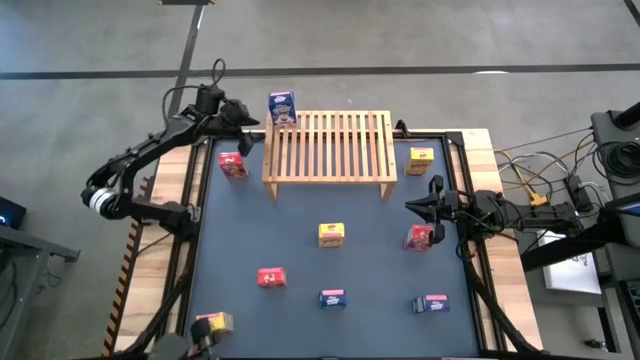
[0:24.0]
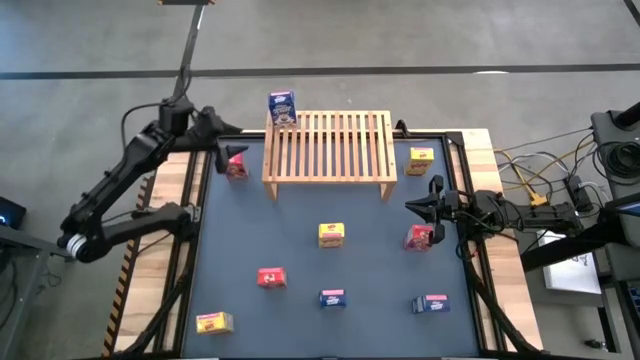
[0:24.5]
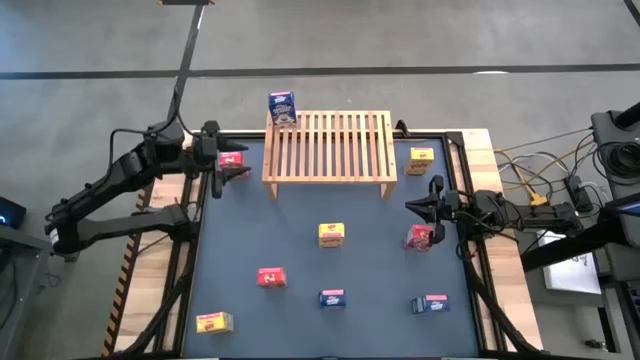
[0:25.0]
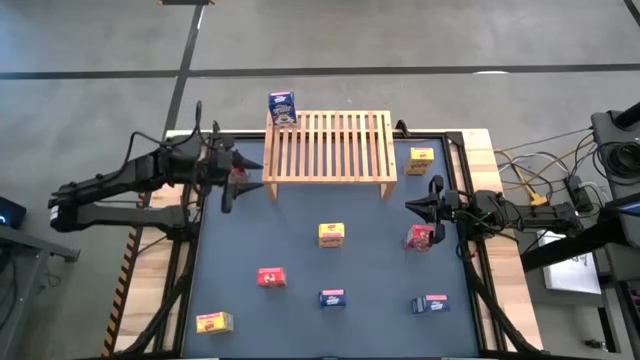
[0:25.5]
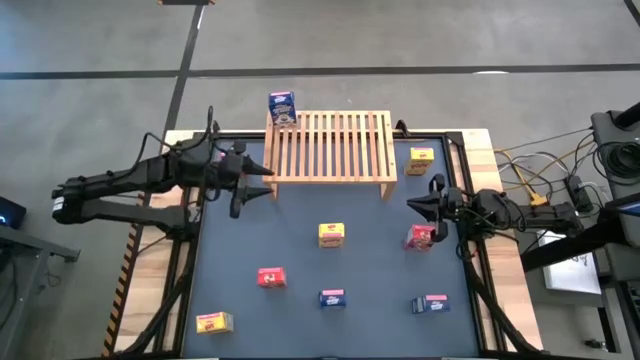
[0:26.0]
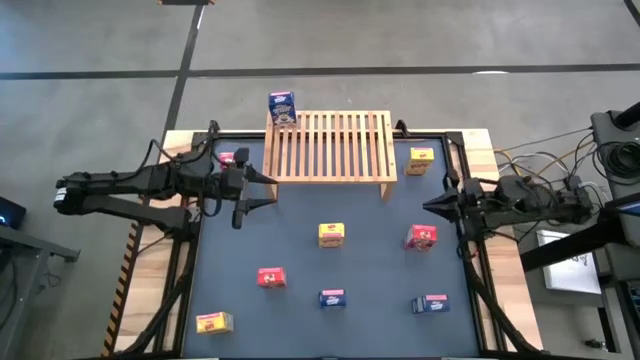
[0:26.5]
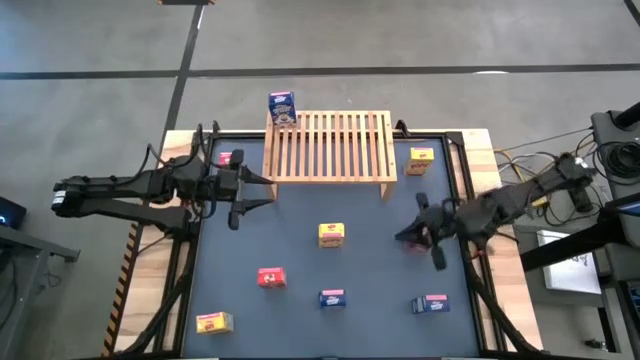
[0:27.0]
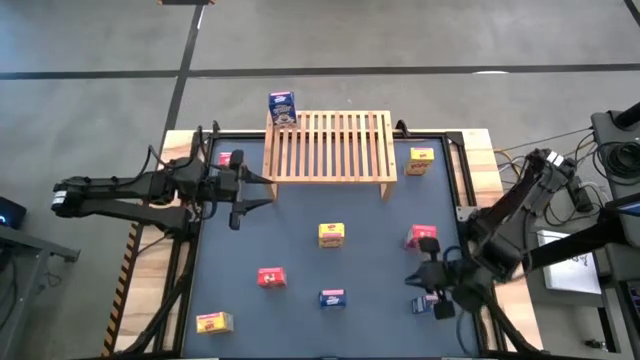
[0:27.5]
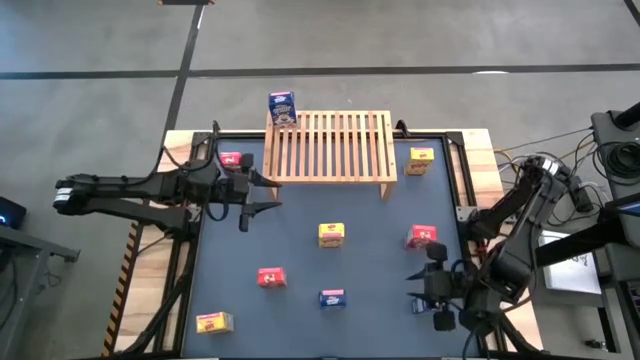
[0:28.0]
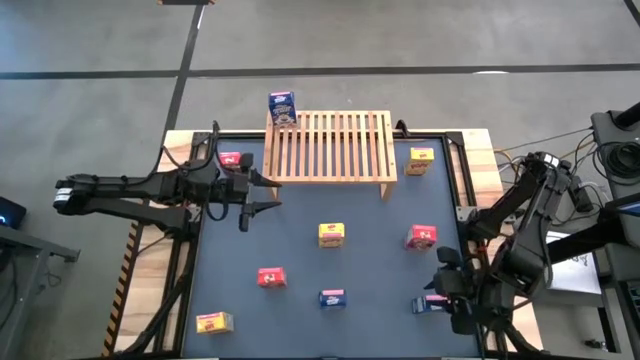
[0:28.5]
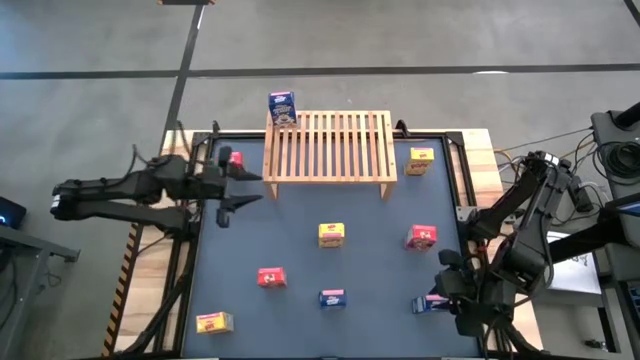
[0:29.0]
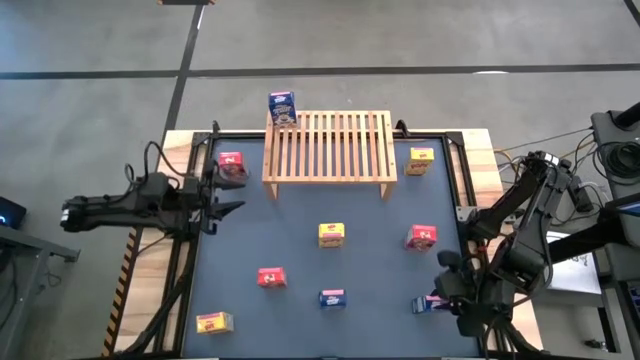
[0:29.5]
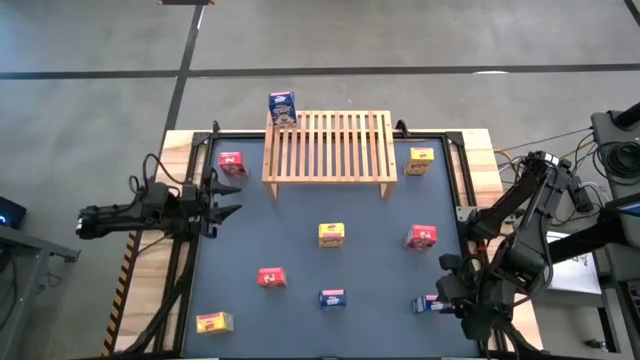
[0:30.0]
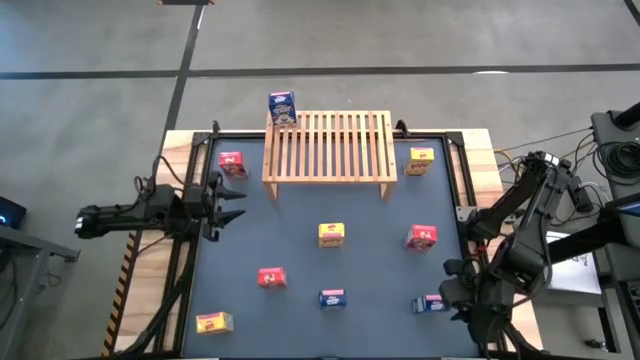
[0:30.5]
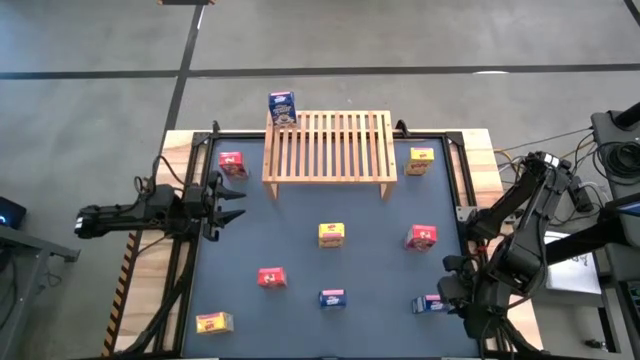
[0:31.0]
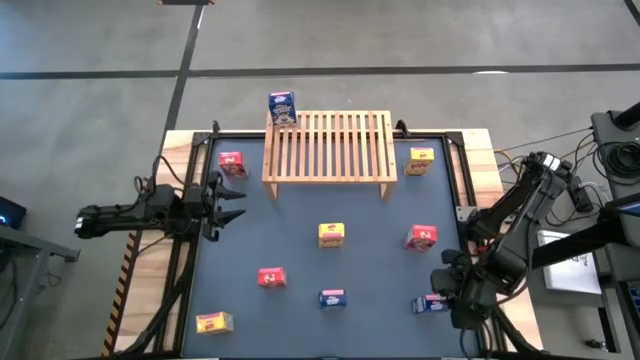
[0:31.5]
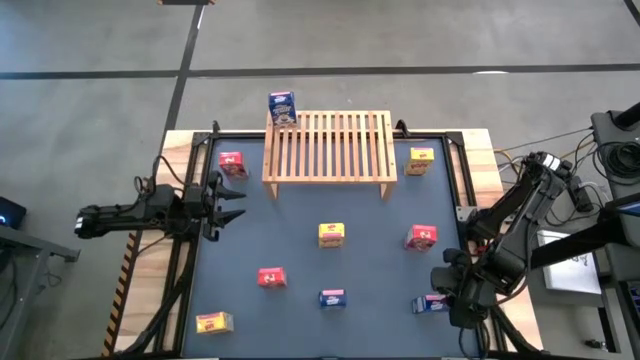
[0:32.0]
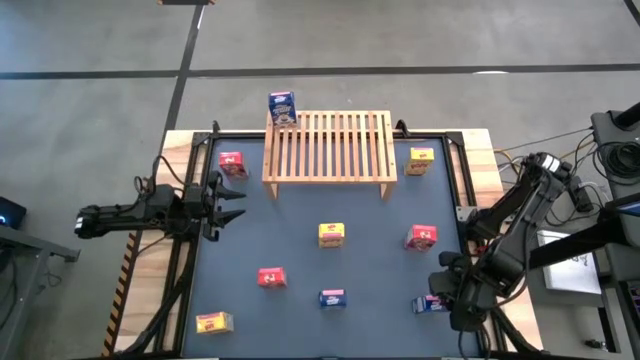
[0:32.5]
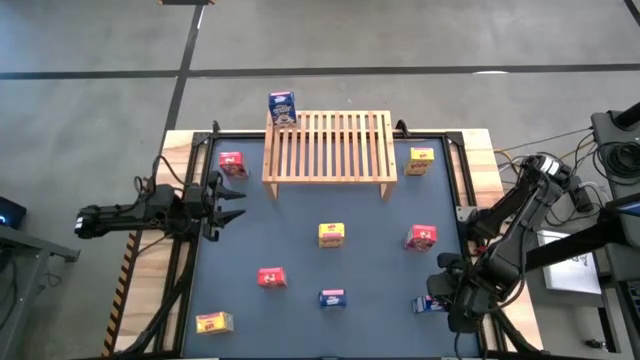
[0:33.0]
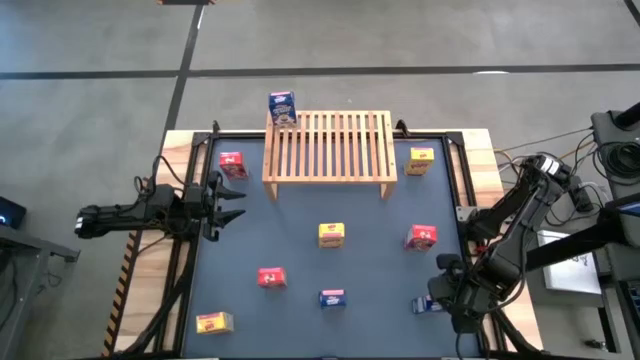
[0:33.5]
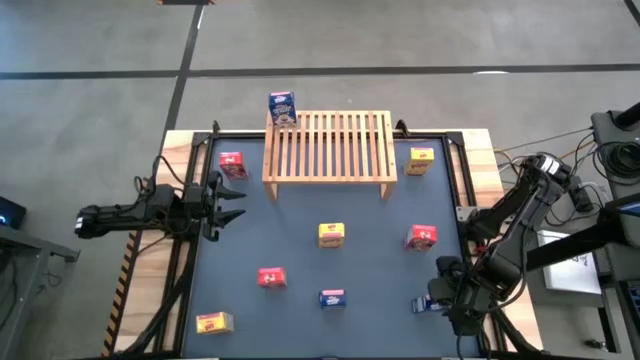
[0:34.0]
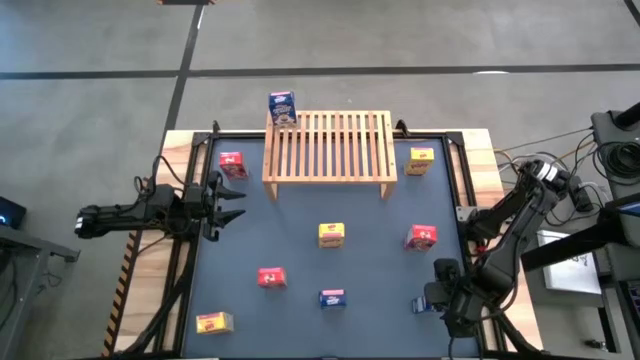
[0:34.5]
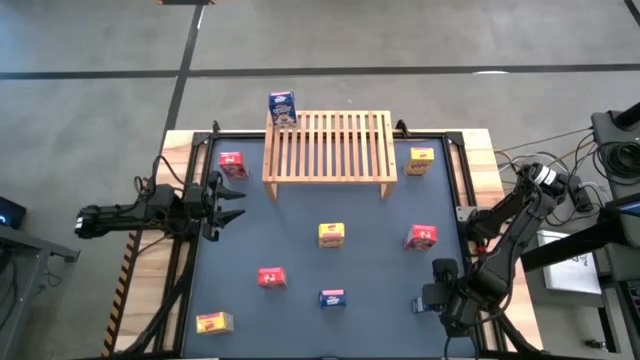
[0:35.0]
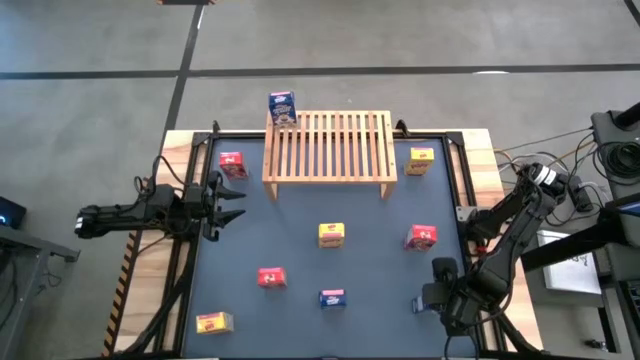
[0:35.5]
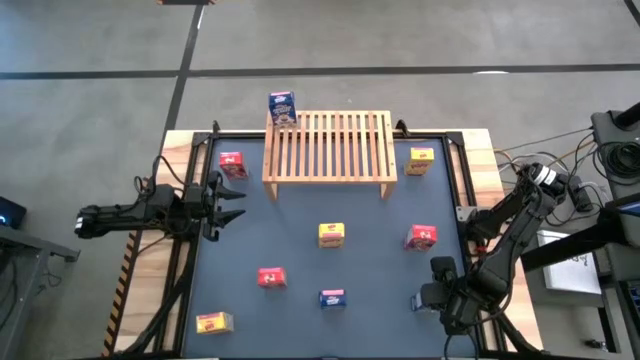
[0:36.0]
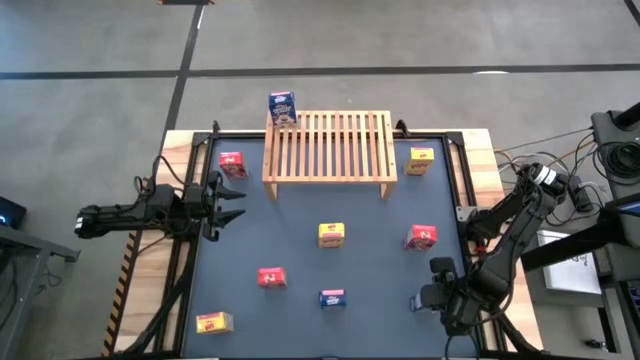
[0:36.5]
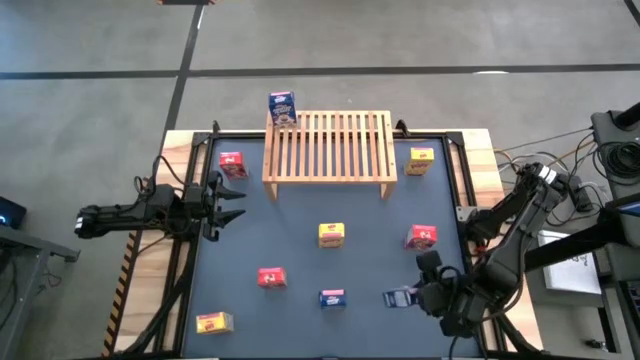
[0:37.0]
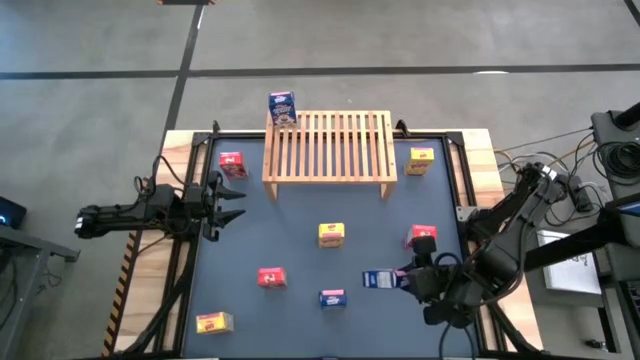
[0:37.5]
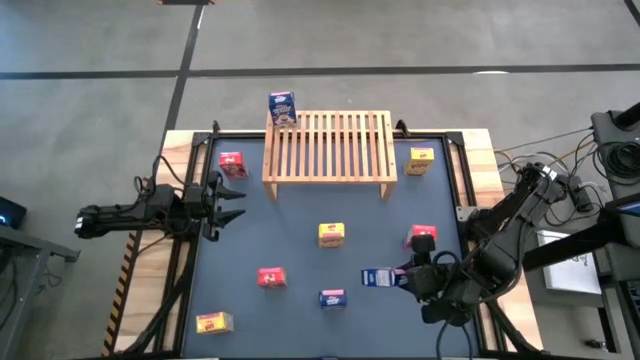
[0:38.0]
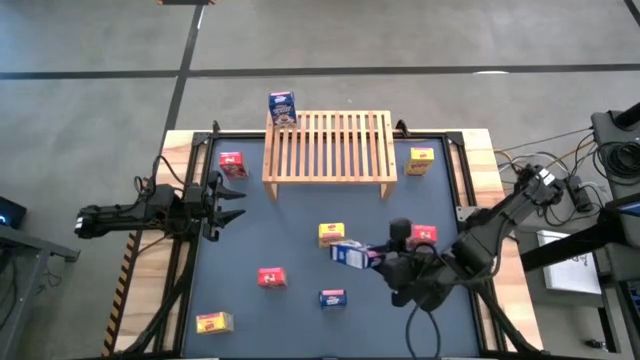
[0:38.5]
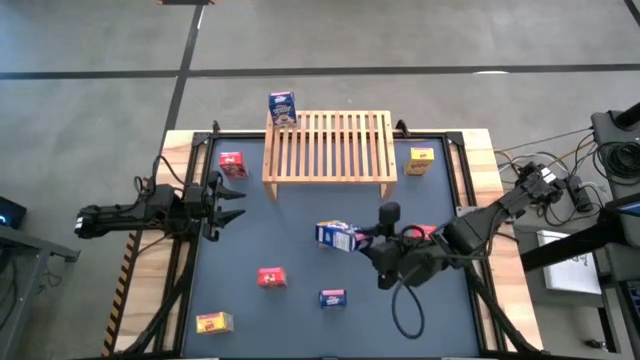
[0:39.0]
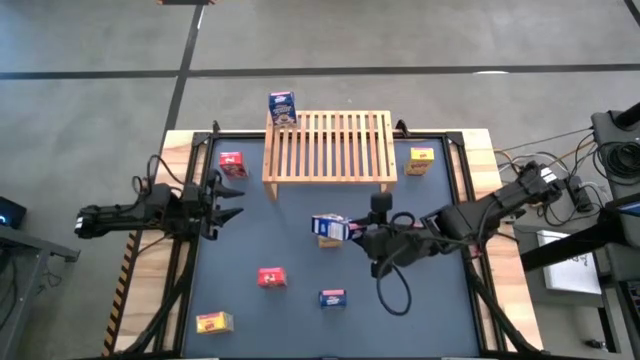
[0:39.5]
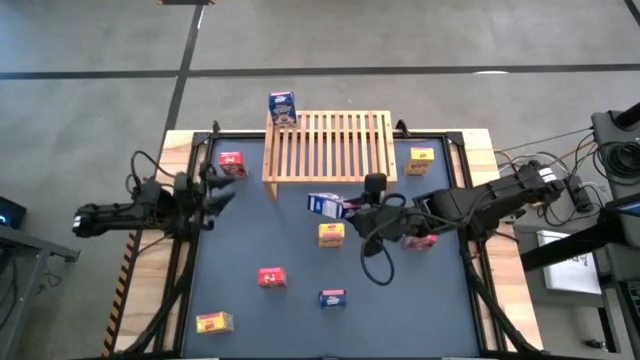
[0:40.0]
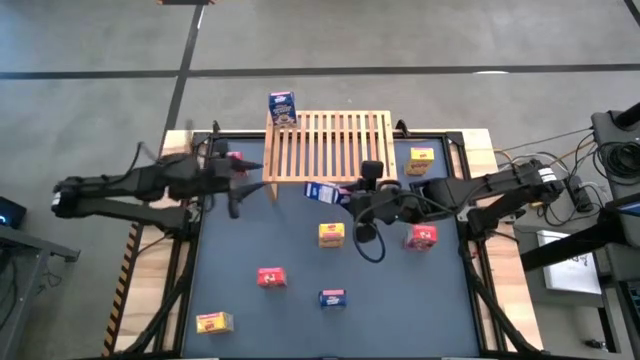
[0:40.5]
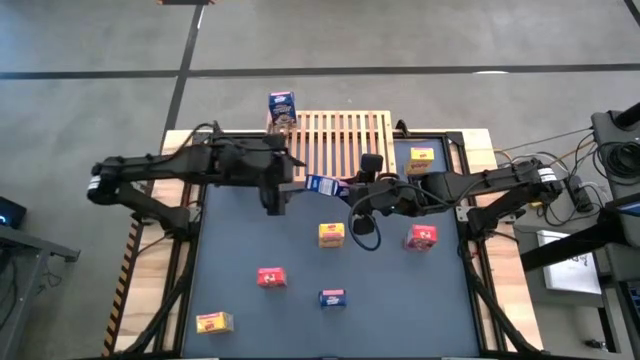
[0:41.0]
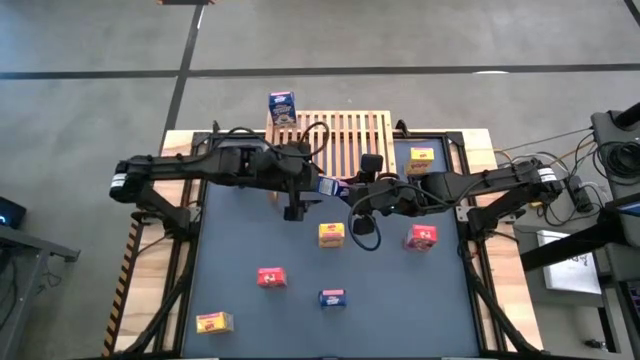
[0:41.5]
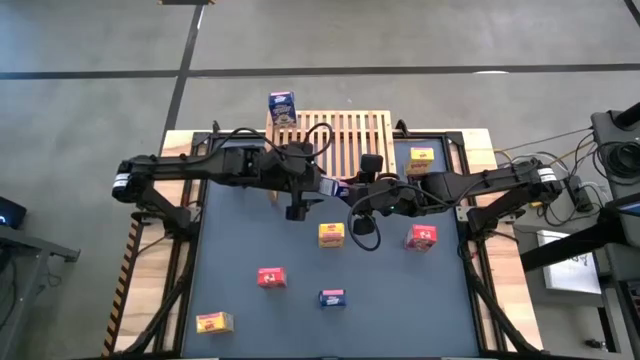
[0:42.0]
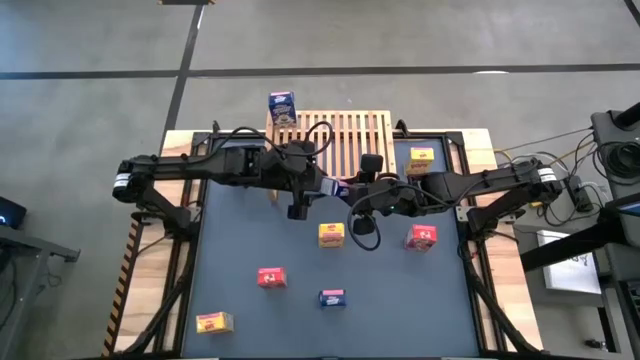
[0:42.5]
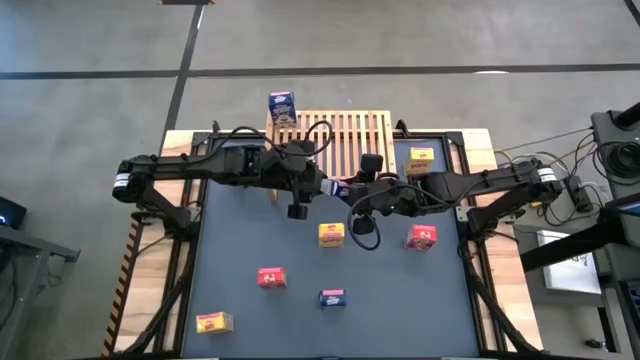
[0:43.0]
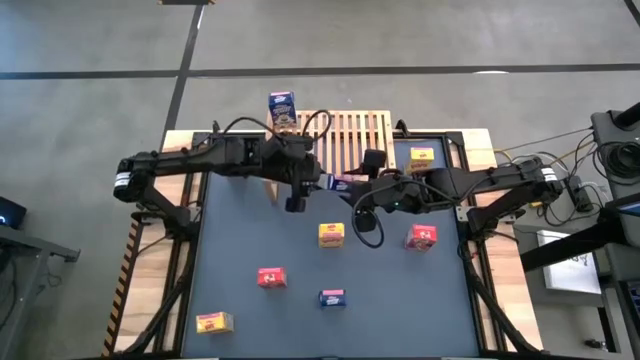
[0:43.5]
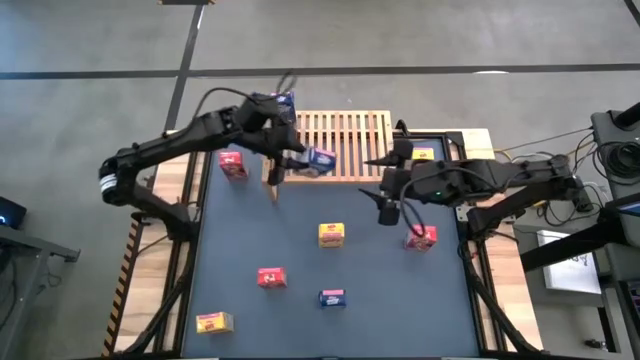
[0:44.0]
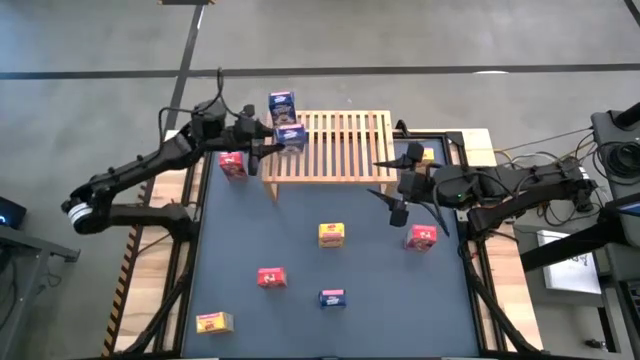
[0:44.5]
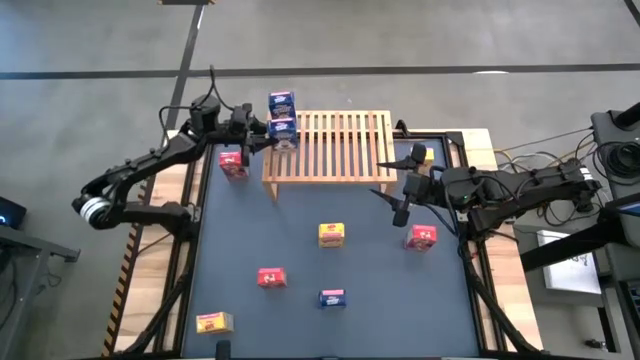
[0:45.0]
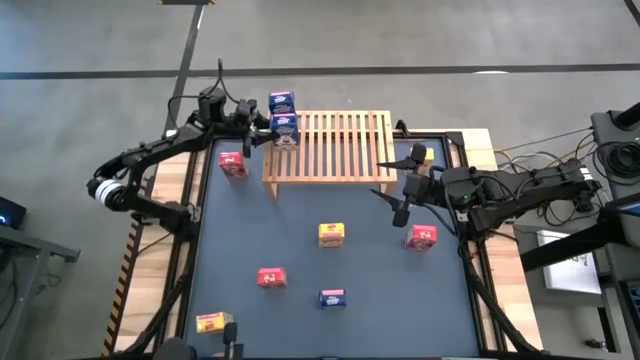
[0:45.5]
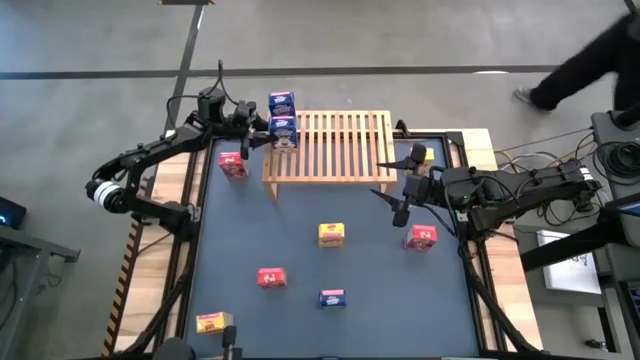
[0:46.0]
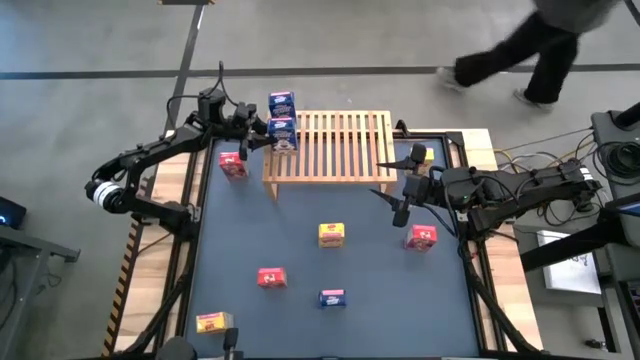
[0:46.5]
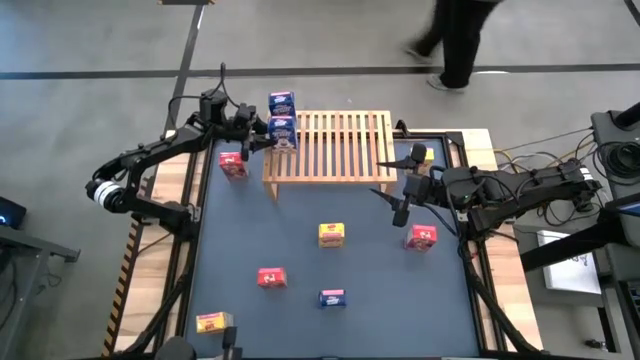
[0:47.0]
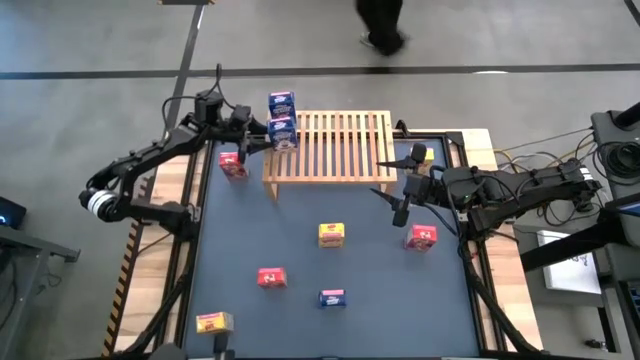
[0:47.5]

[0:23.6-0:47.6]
Task: Stack cereal on shelf
Put the right blue cereal box on the shelf aligned with the other blue cereal box
